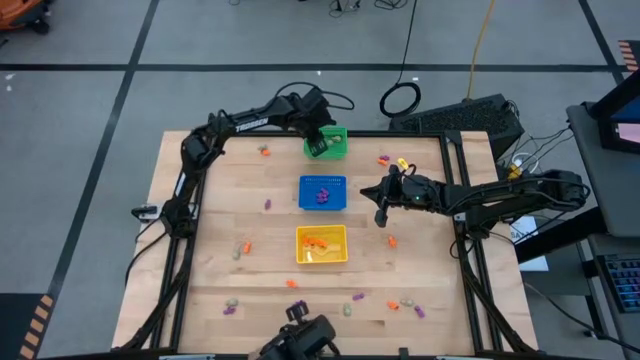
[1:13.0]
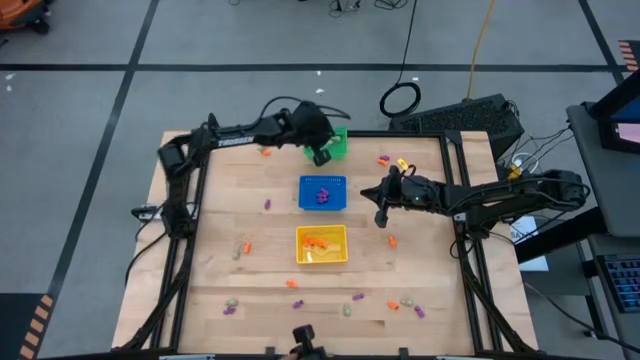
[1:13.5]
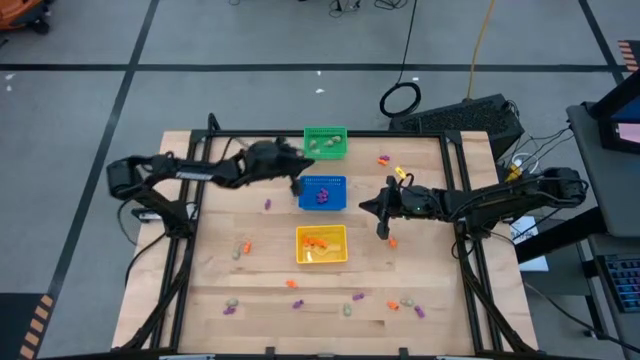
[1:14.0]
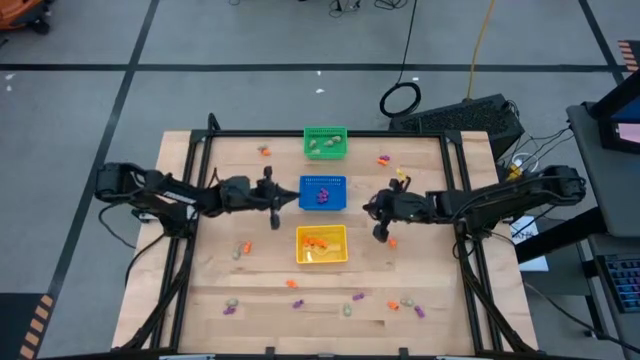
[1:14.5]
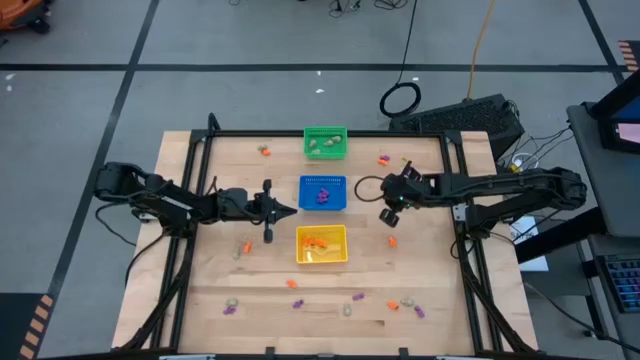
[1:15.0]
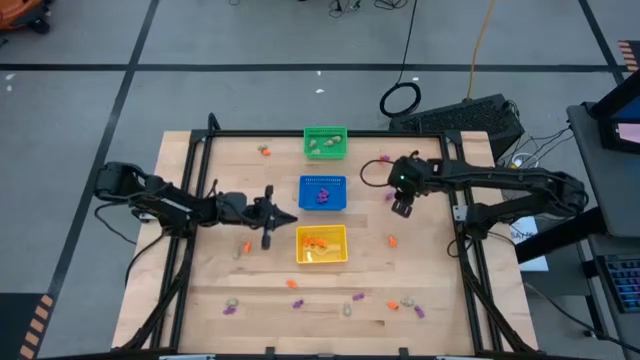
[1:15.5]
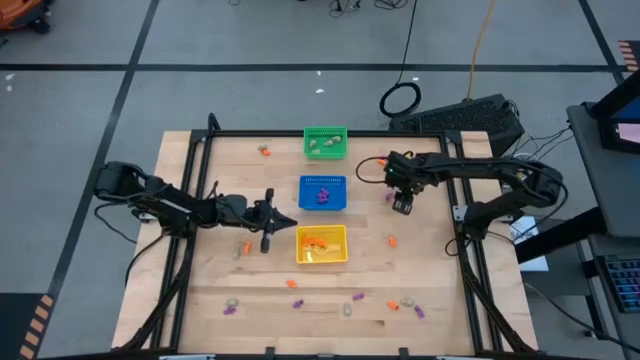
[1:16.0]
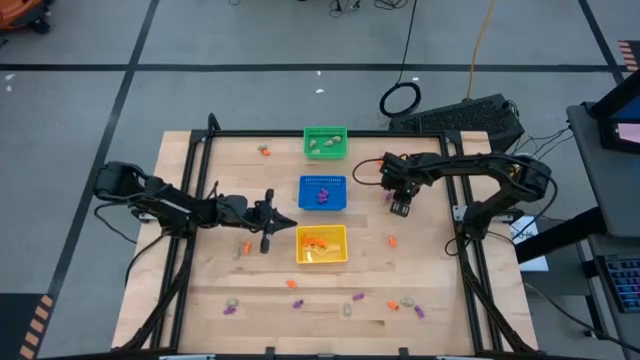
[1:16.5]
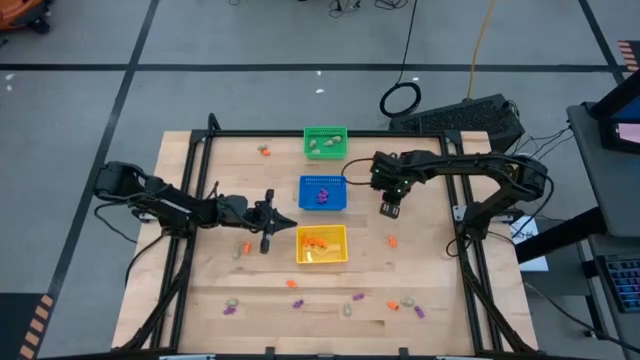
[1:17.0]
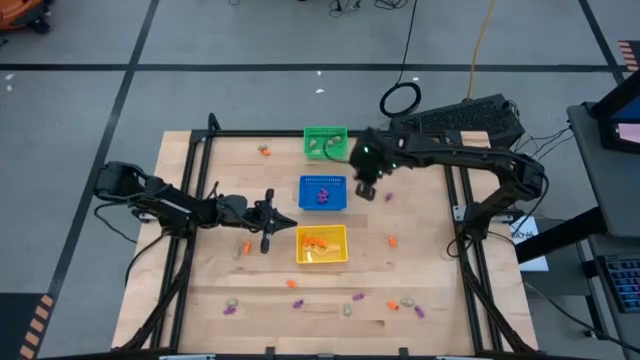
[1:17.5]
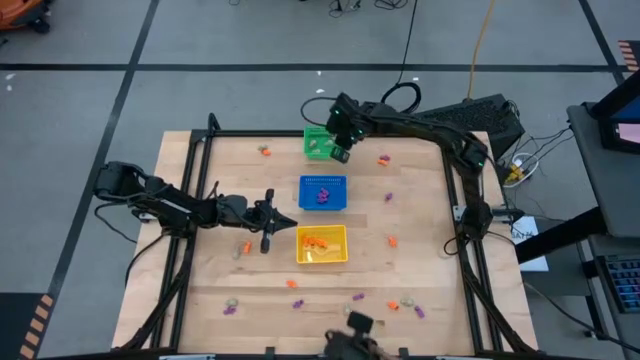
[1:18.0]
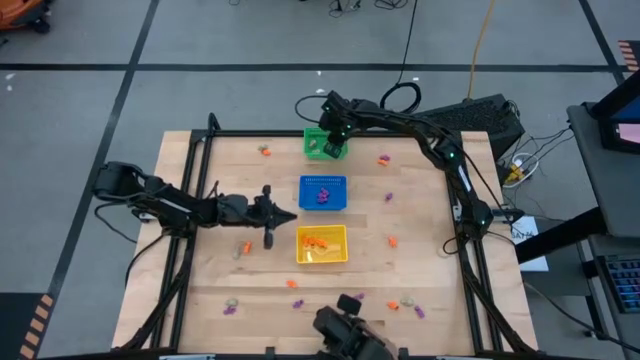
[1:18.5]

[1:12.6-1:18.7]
Task: Sort Halloween decoration
Put the white skull toy into the green bin

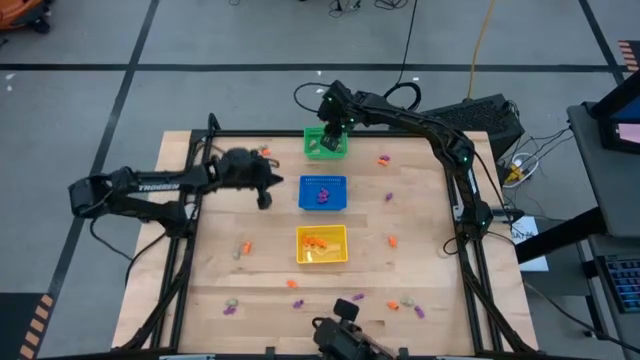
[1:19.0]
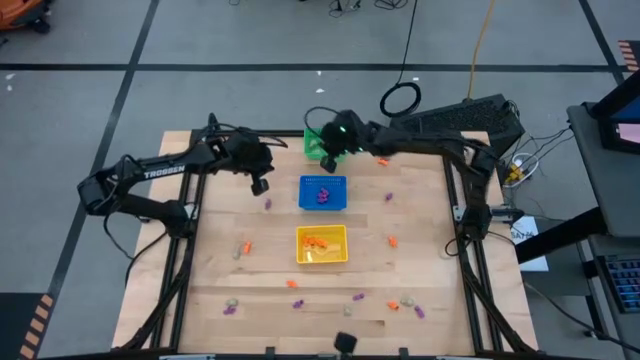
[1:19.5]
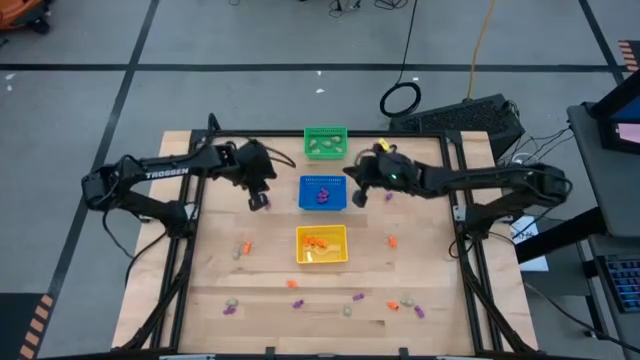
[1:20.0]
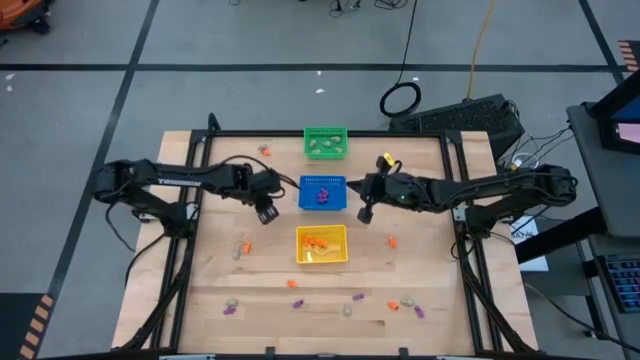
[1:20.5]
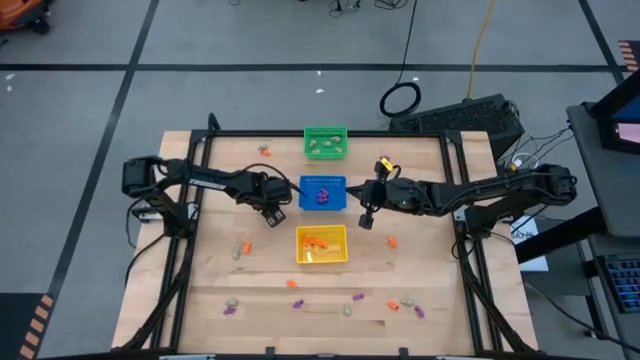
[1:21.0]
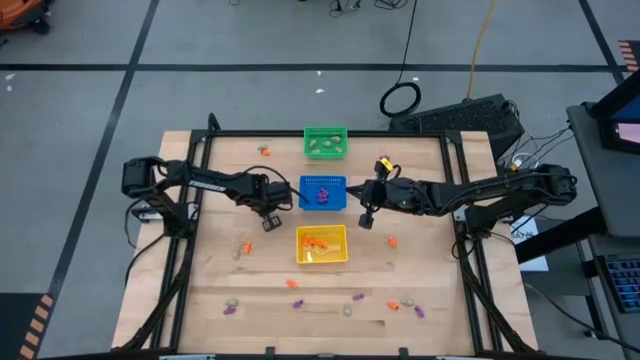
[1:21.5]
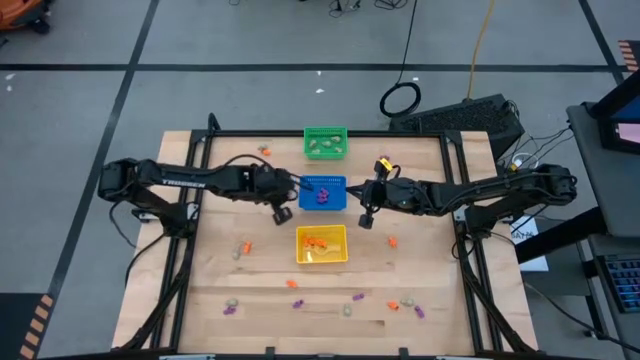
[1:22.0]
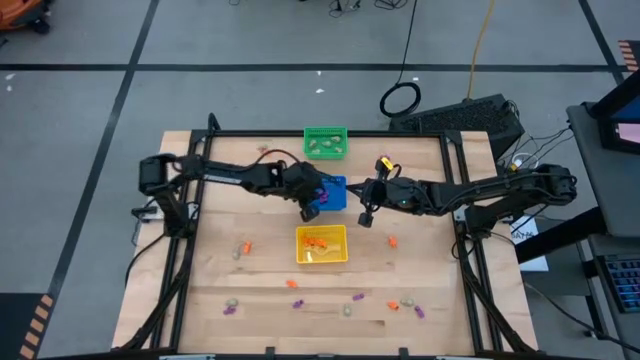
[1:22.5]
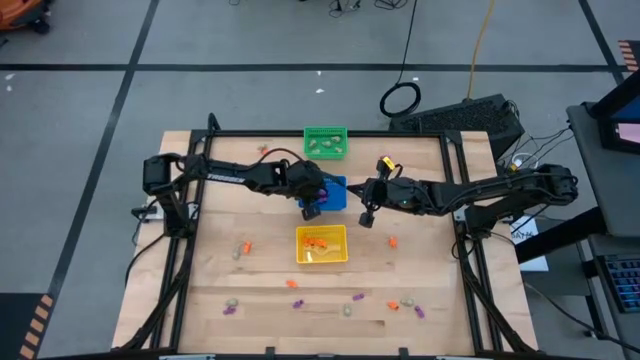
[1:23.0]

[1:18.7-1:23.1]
Put the purple skeleton toy into the blue bin

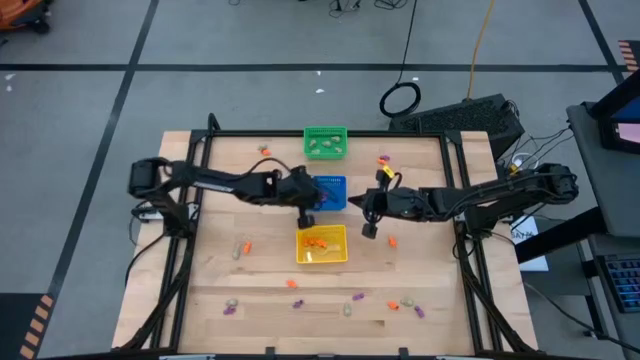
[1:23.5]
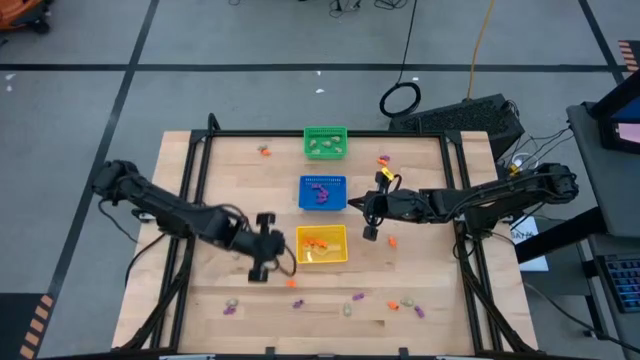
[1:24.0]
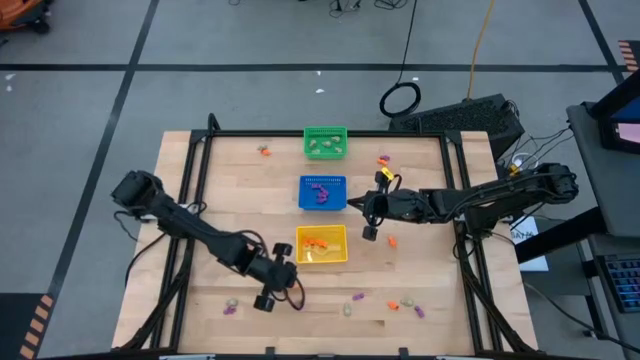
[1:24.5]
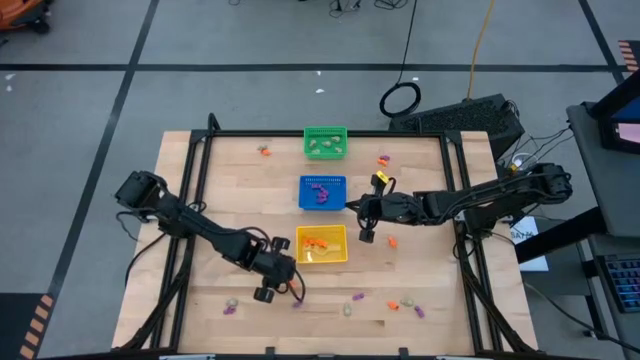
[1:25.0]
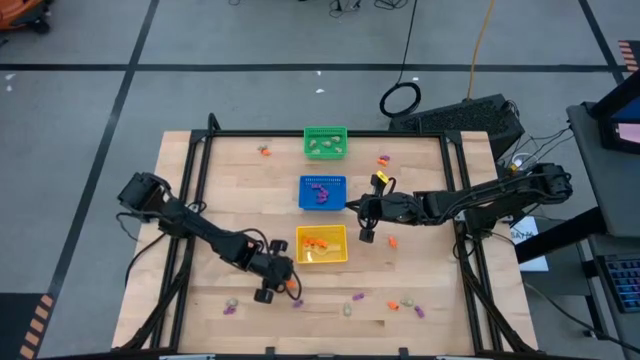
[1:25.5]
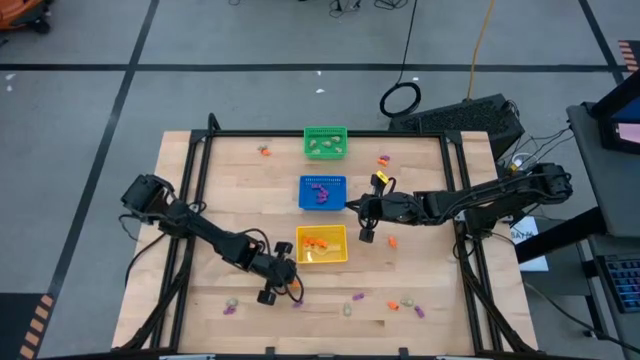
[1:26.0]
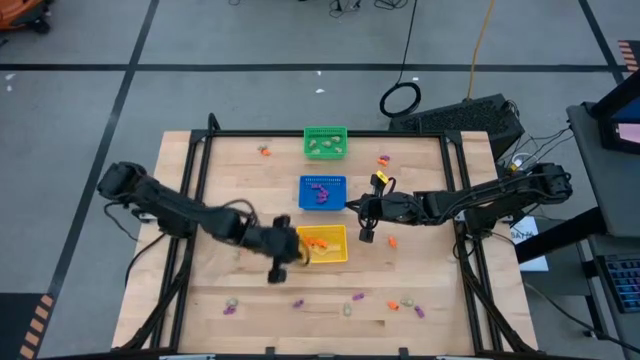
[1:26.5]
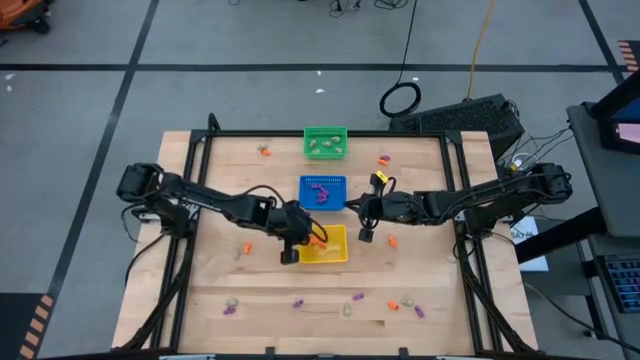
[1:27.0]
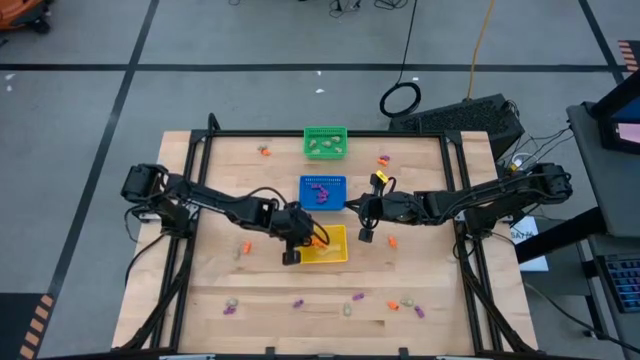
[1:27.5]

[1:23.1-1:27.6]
Put the orange skeleton toy into the yellow bin

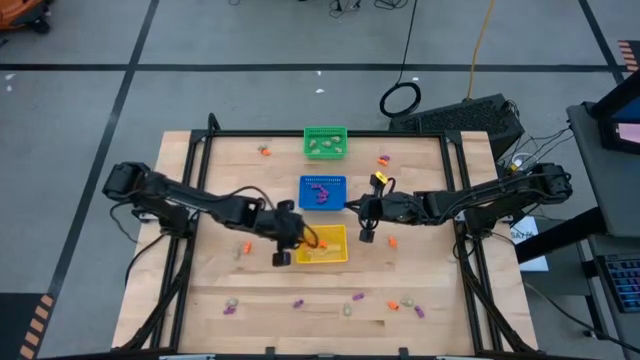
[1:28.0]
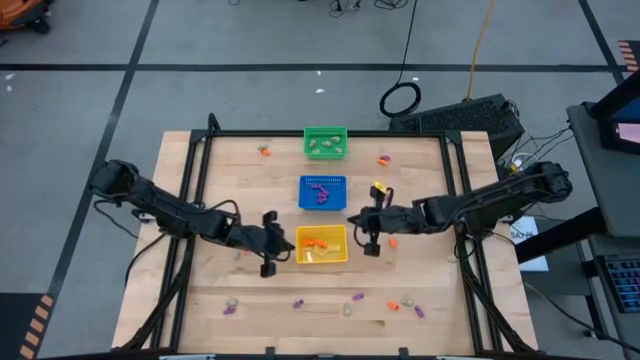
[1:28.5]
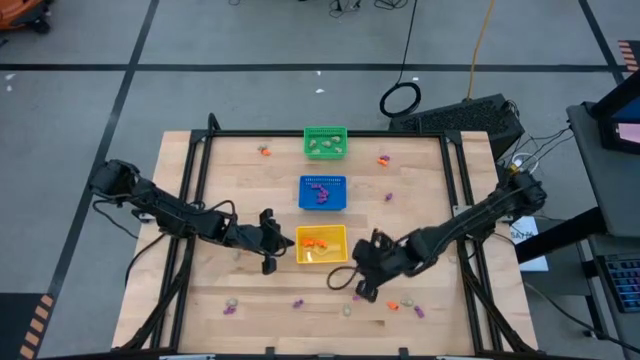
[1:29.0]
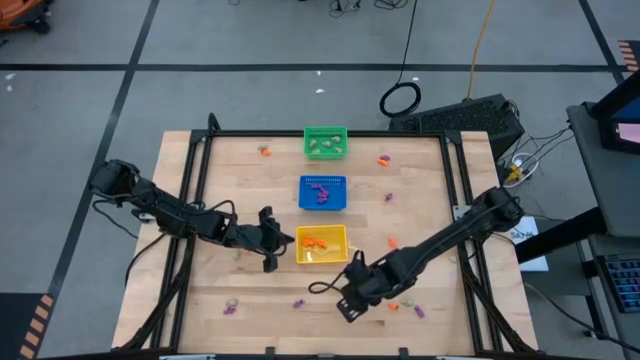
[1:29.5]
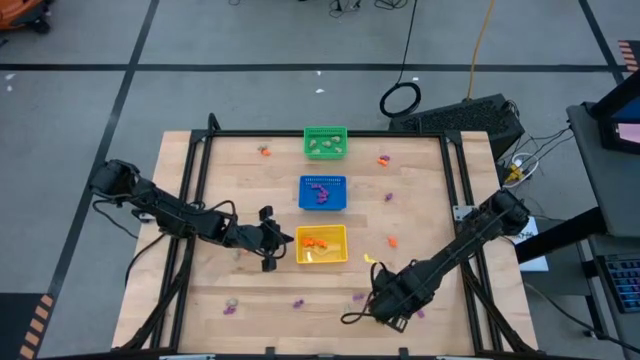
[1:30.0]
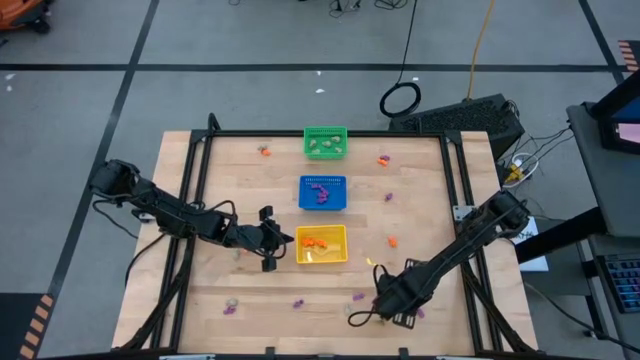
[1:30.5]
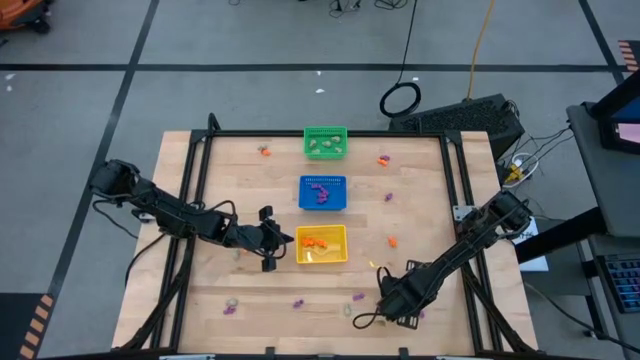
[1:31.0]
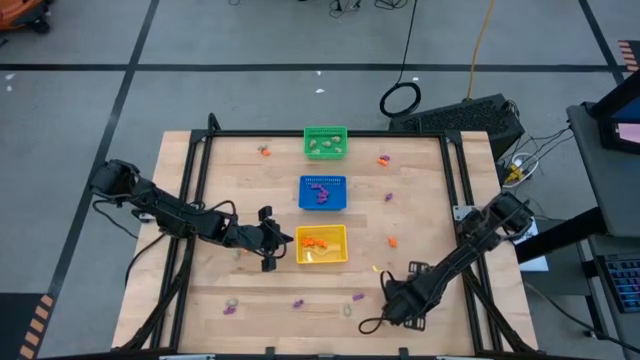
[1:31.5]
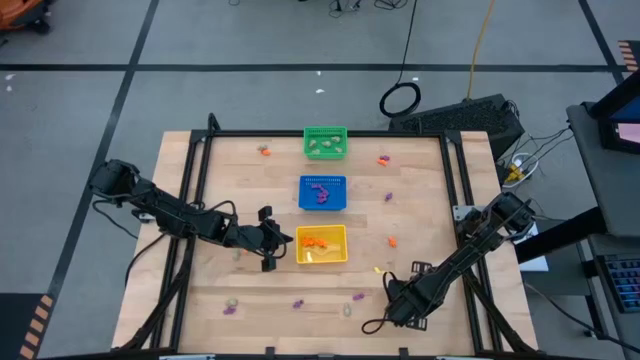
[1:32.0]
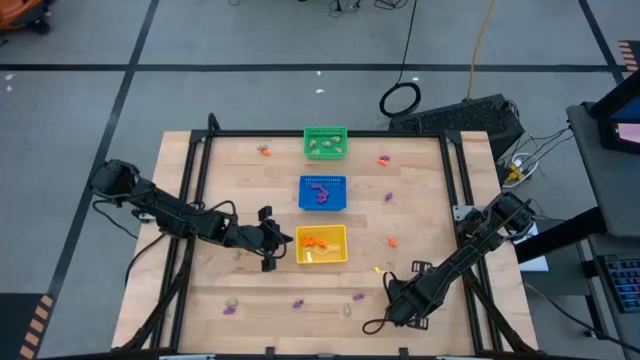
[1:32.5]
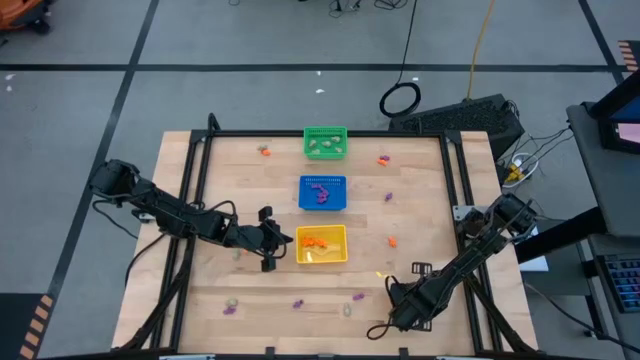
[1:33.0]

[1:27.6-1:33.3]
Put the white skull toy into the green bin
